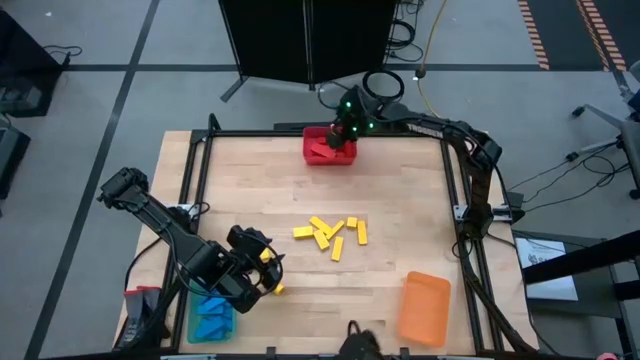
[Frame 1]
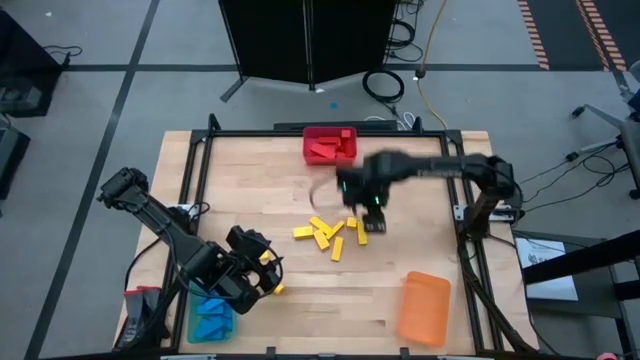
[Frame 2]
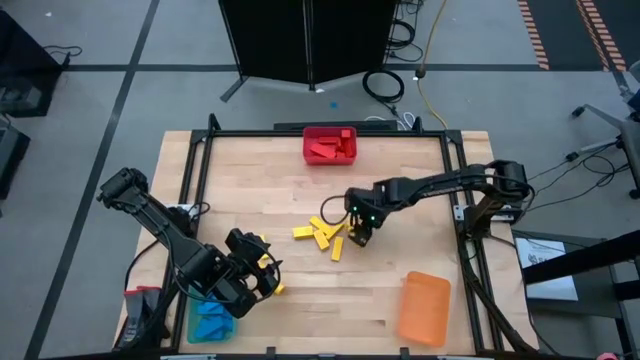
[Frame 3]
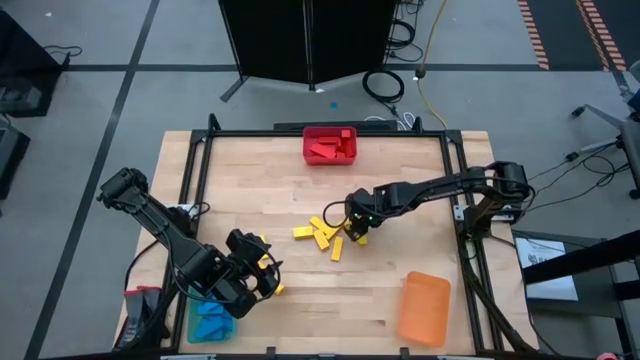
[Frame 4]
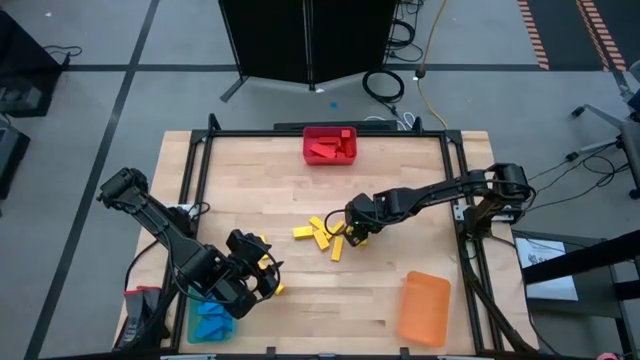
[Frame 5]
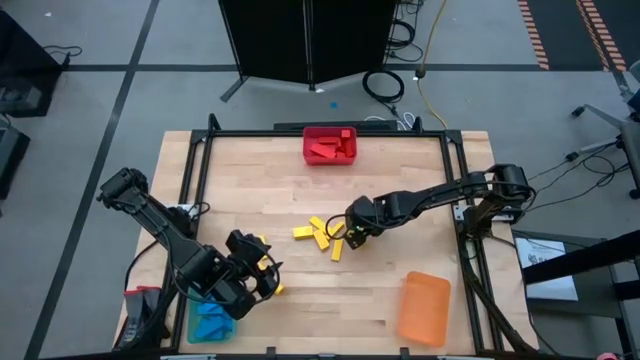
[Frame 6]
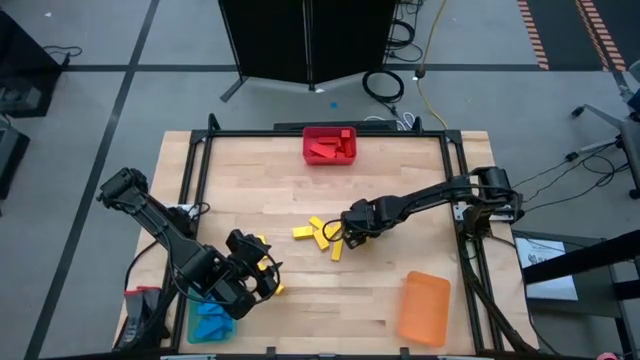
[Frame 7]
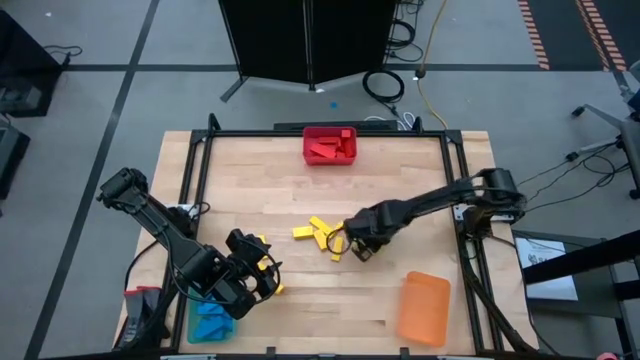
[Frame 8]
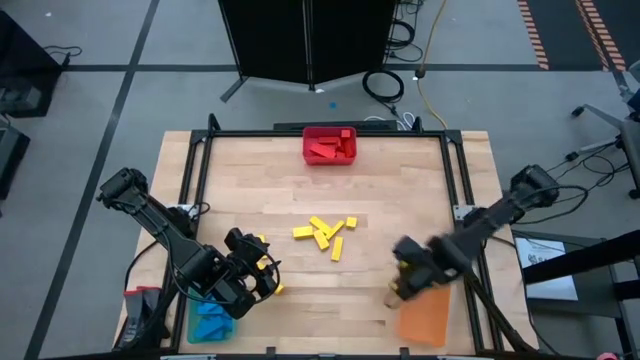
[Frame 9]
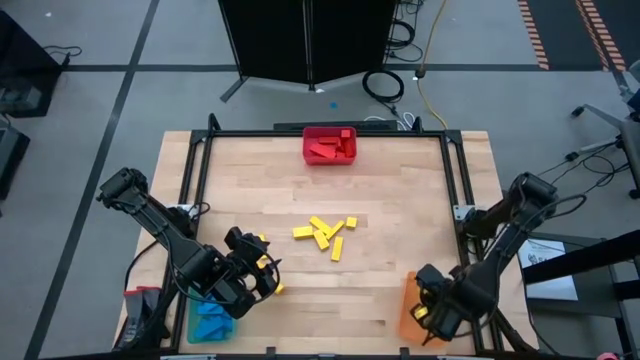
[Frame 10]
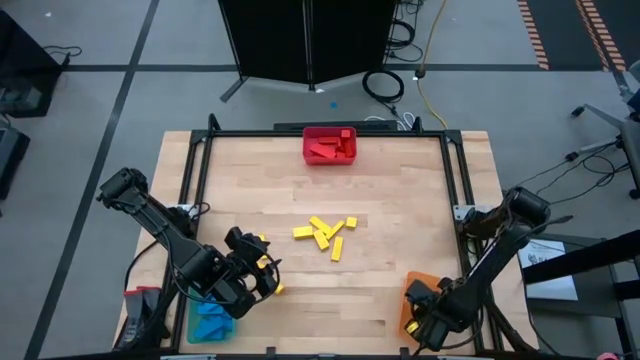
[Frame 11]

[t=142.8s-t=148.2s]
Task: Sort blocks
Put the yellow block into the orange bin

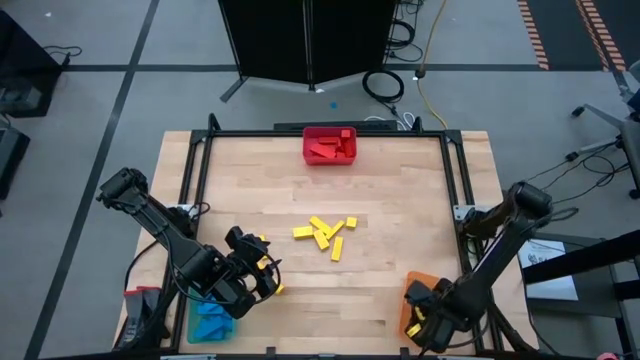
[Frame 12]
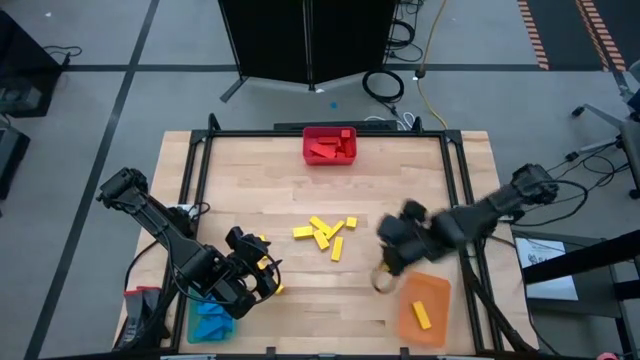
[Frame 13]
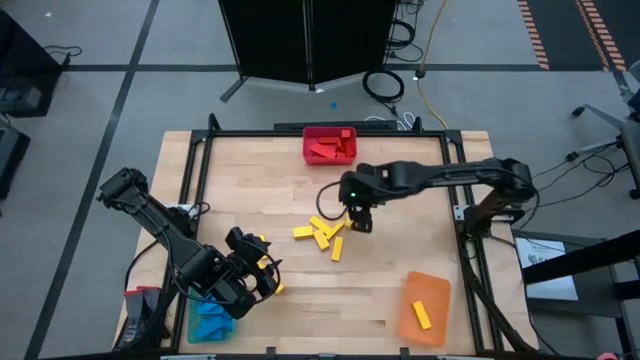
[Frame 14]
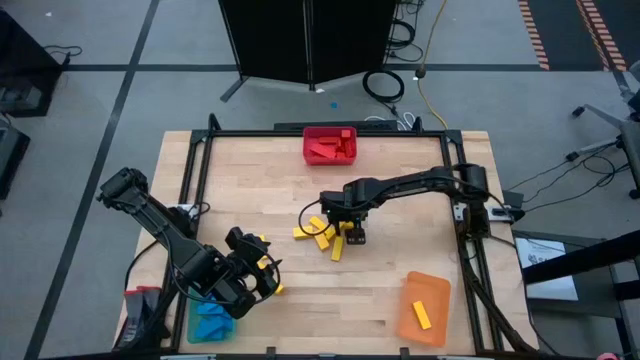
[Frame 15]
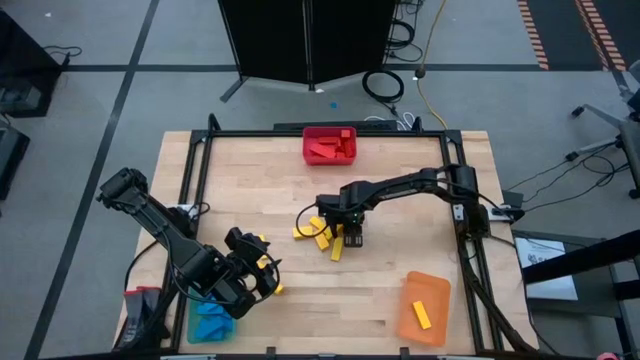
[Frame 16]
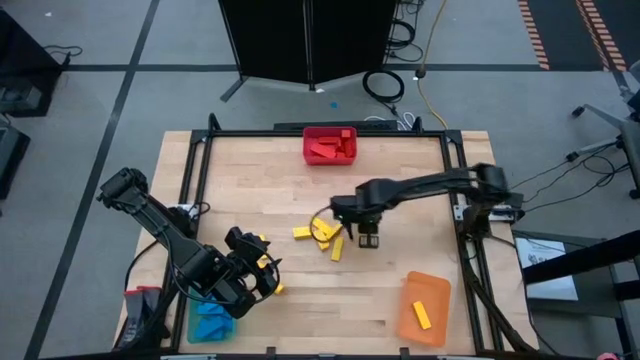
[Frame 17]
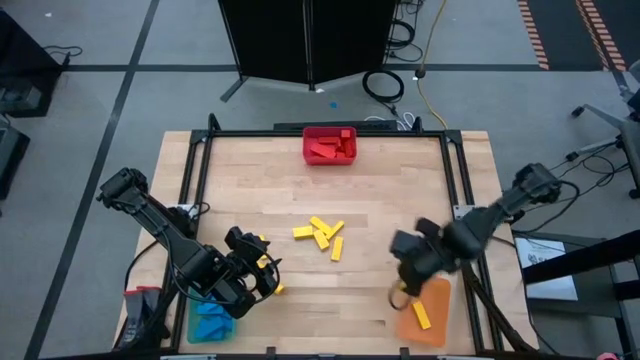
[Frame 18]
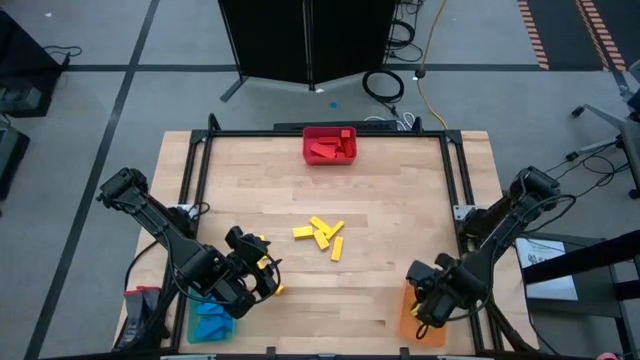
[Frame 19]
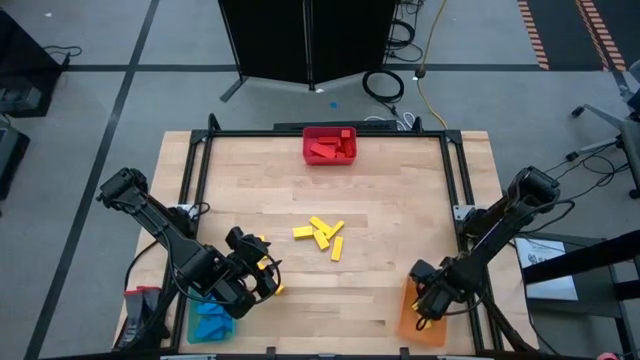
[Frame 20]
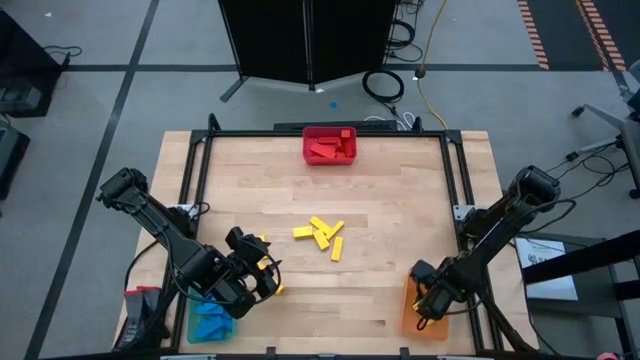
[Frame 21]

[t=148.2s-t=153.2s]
Put the yellow block into the orange bin

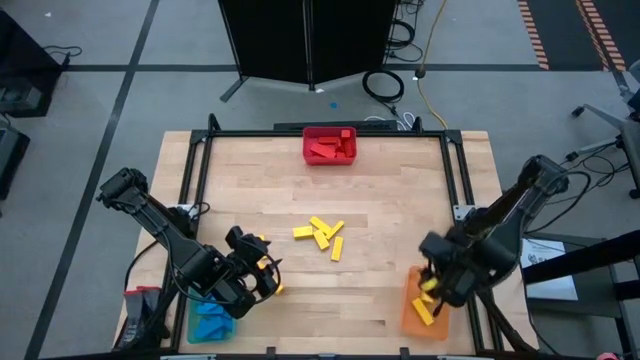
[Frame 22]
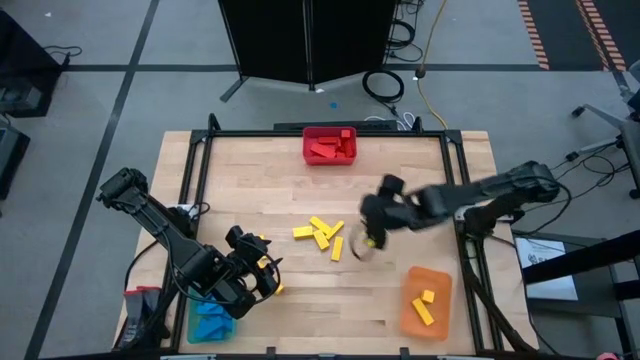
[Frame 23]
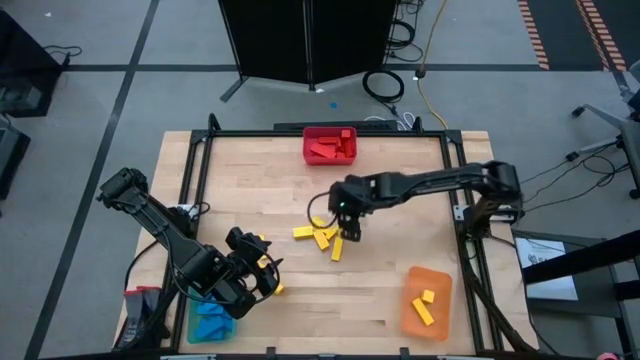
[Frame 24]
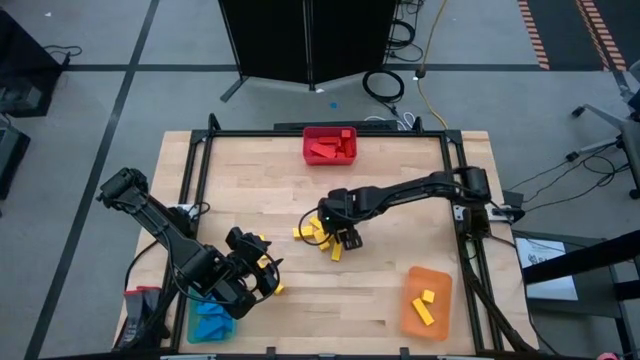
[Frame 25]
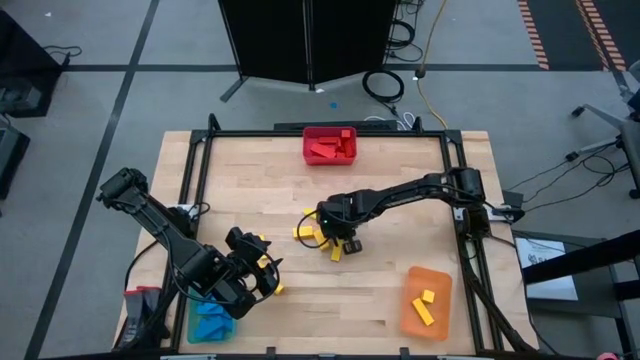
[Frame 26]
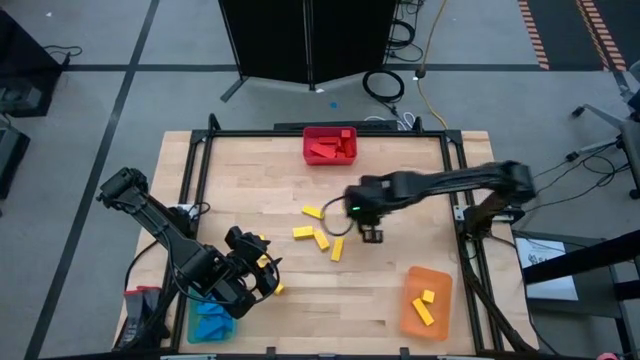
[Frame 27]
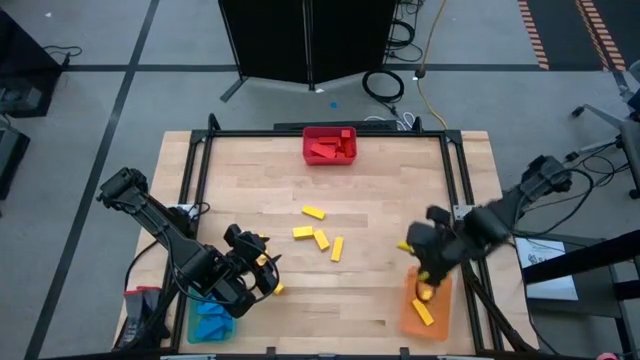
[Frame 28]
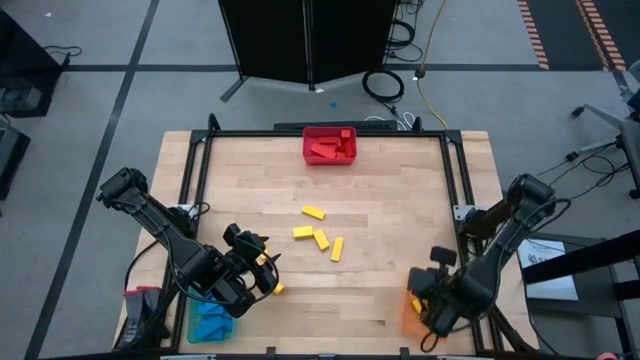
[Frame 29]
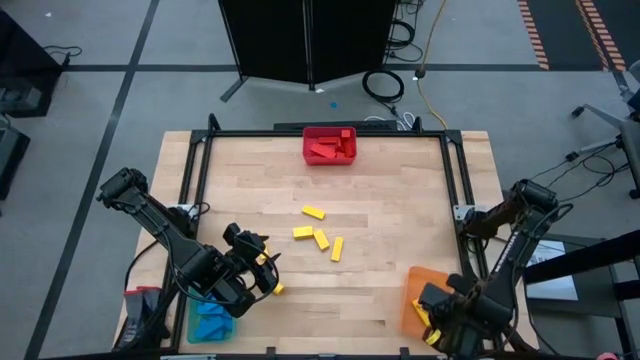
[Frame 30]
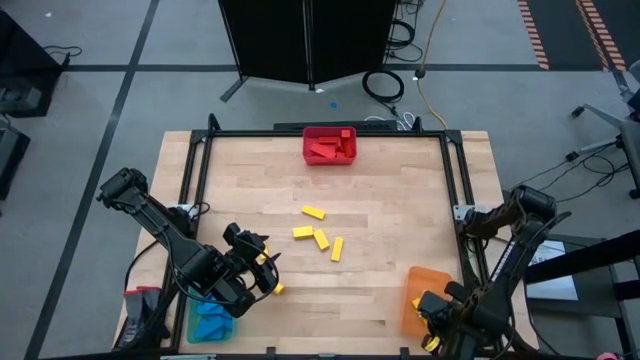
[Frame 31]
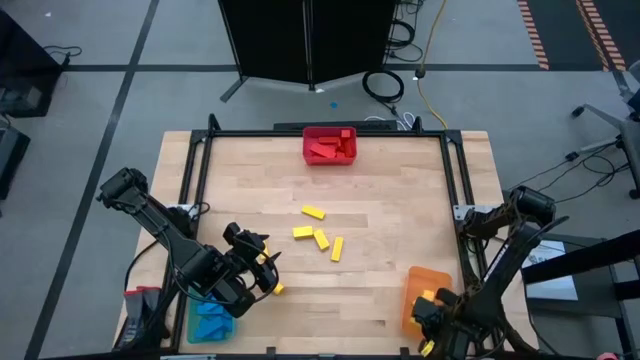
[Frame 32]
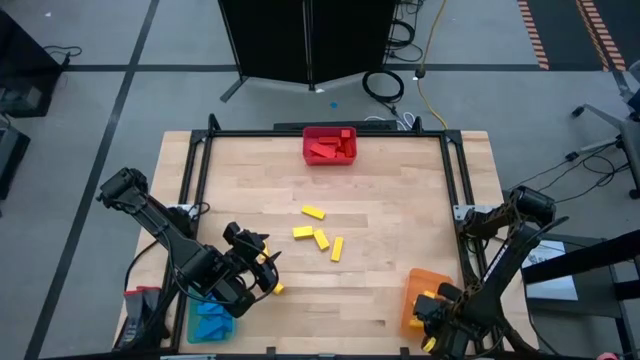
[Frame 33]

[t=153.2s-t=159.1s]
Put the yellow block into the orange bin

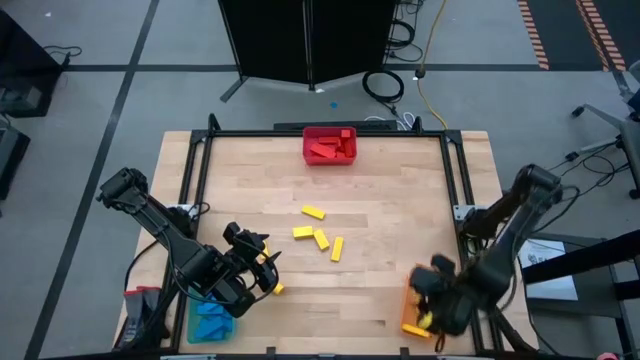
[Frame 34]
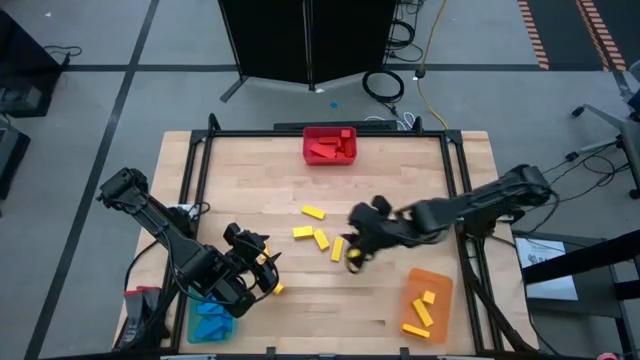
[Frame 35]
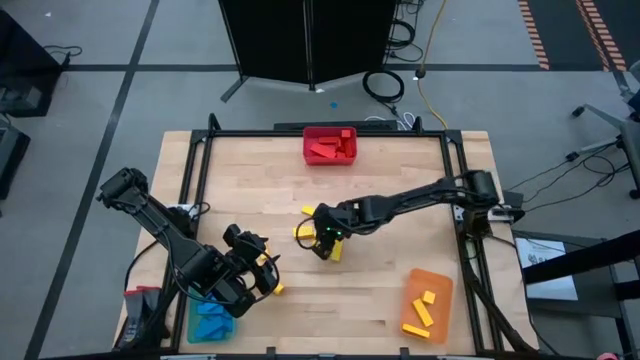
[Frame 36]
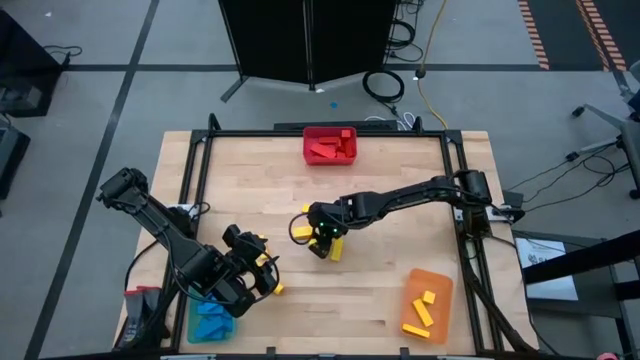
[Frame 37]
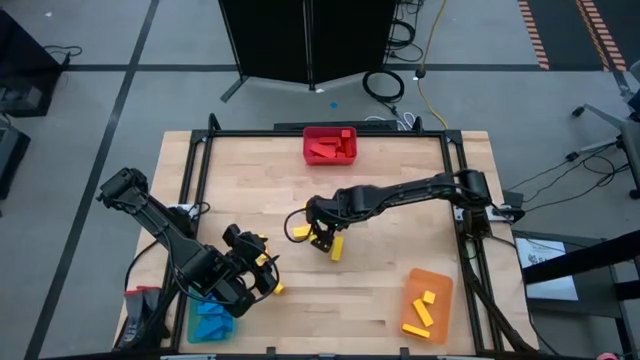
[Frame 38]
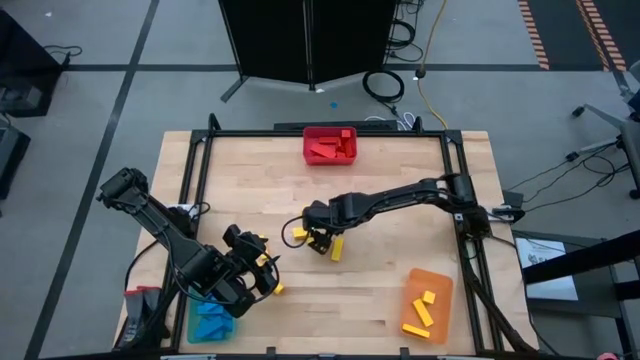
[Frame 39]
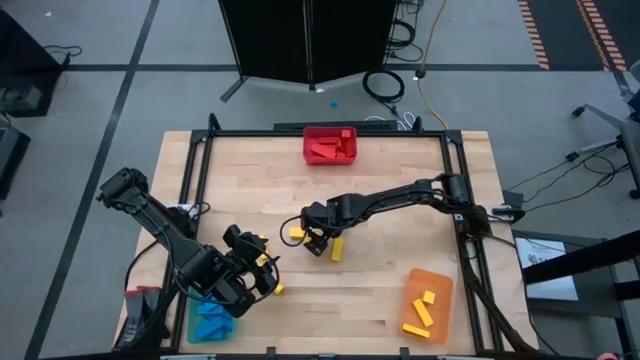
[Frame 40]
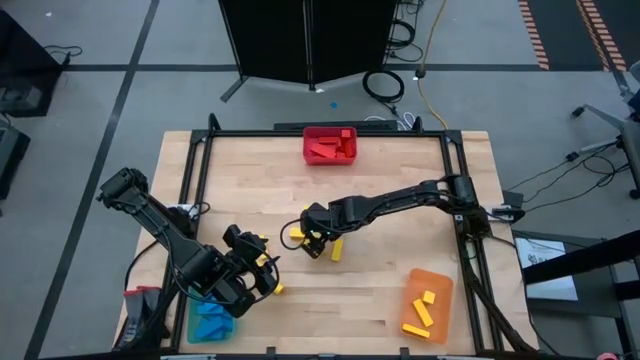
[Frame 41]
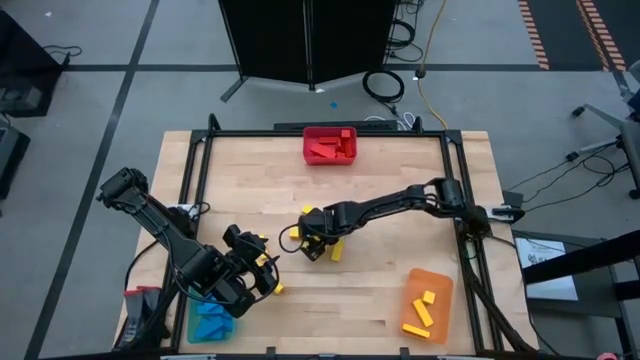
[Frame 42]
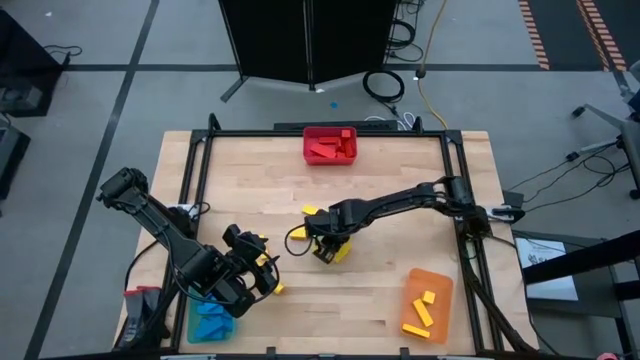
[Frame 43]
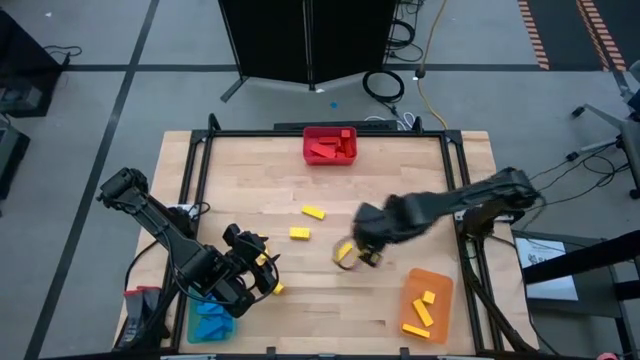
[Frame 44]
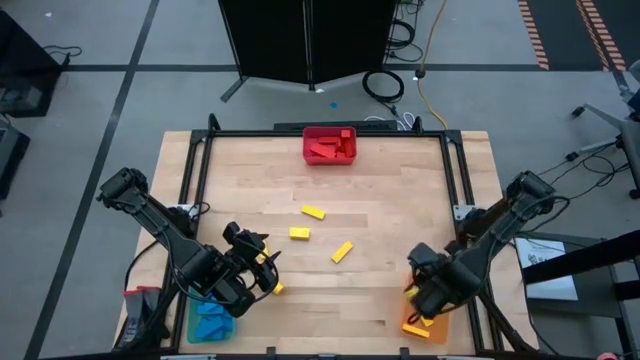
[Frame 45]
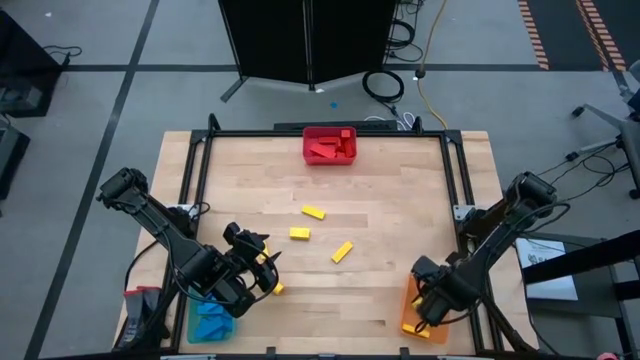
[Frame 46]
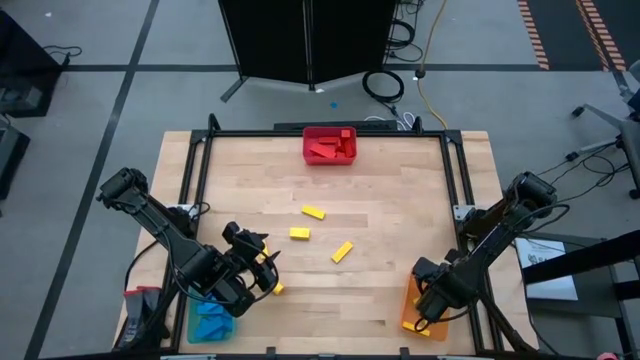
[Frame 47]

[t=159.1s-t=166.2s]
Put the yellow block into the orange bin
